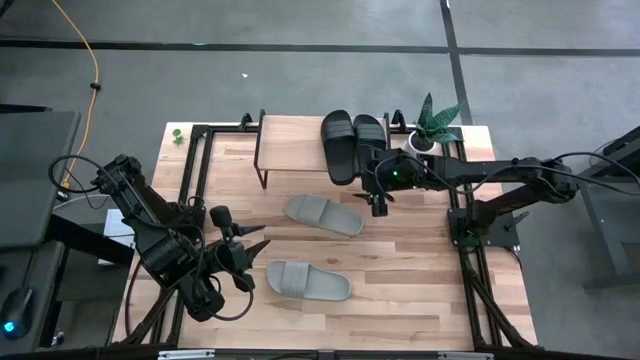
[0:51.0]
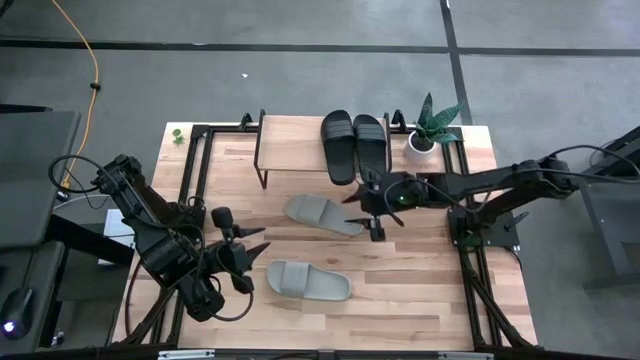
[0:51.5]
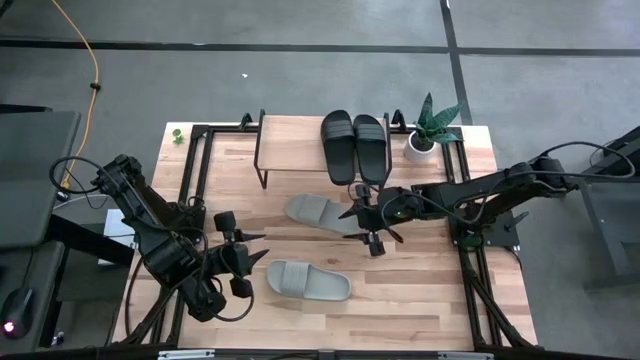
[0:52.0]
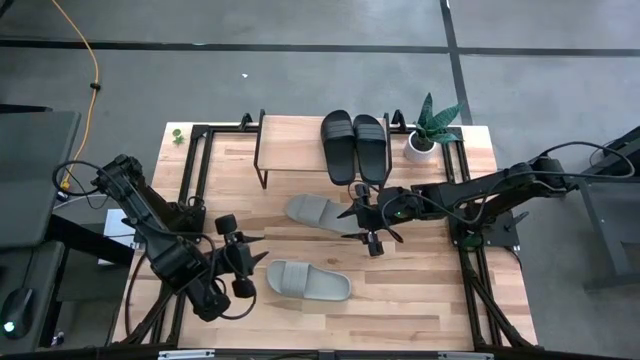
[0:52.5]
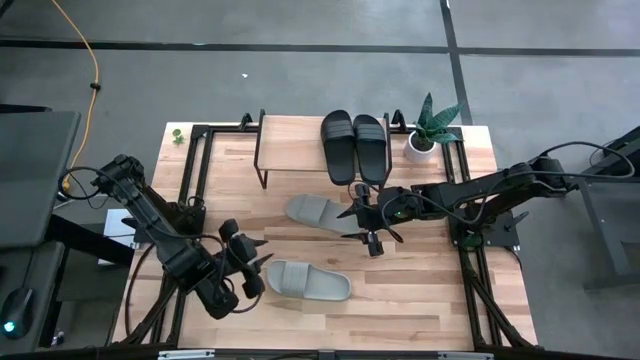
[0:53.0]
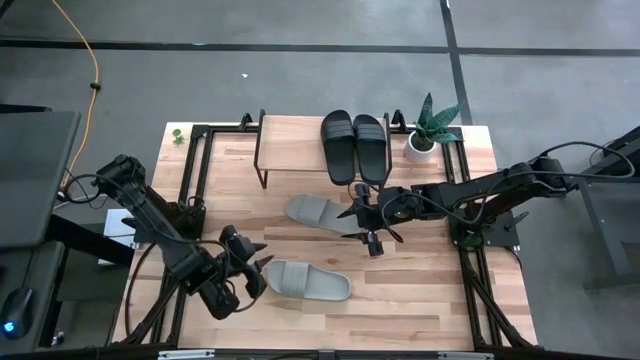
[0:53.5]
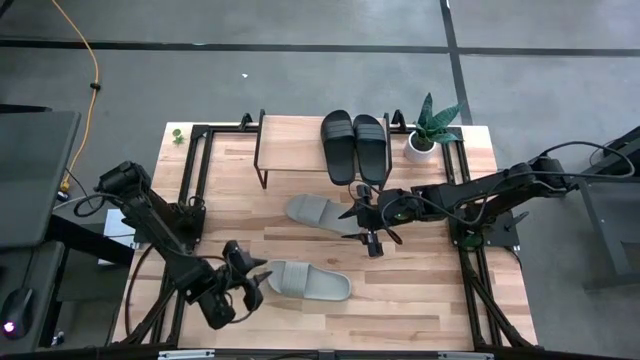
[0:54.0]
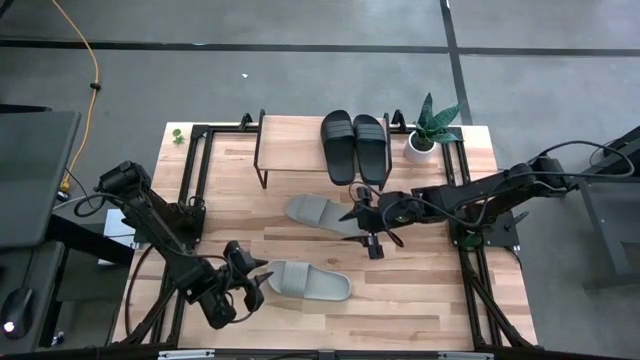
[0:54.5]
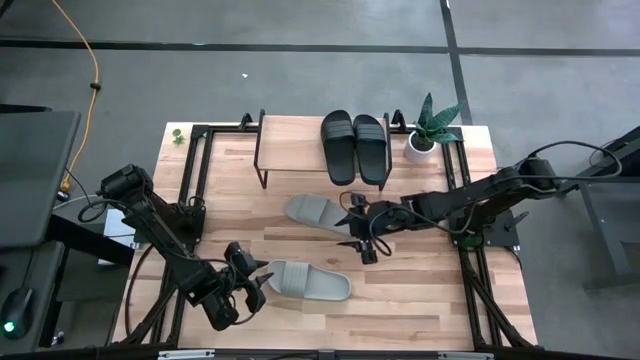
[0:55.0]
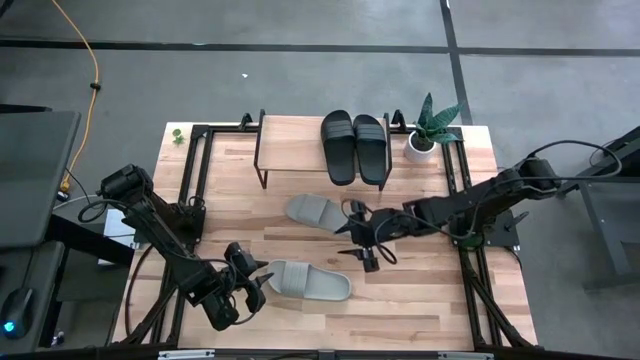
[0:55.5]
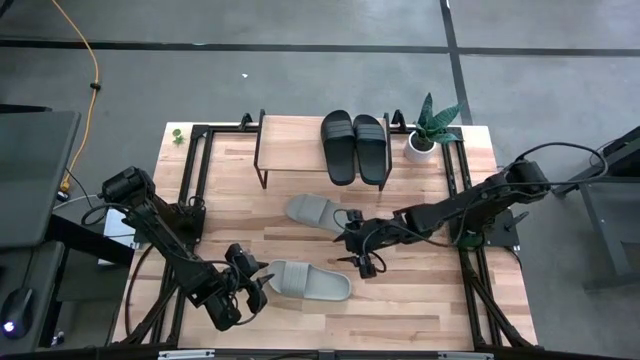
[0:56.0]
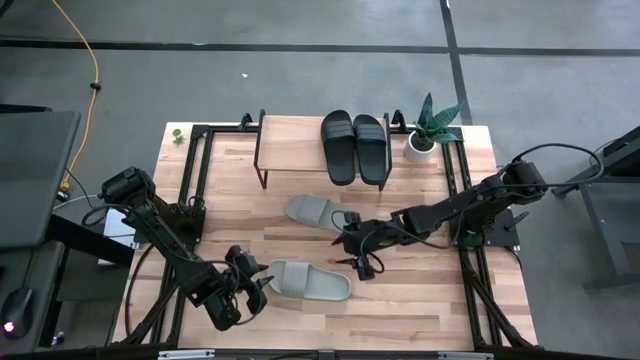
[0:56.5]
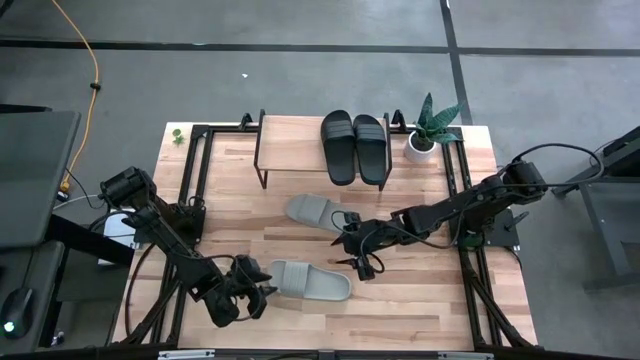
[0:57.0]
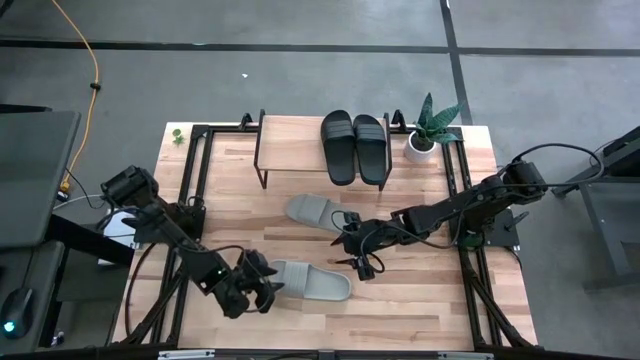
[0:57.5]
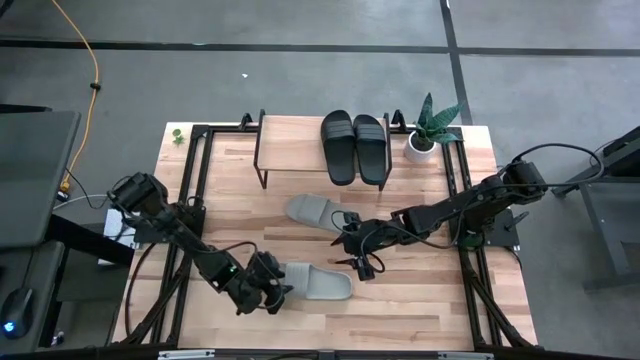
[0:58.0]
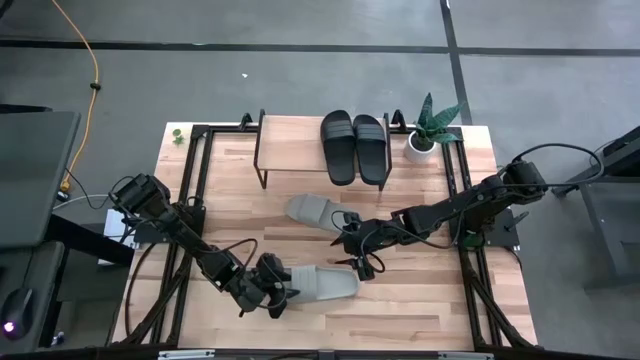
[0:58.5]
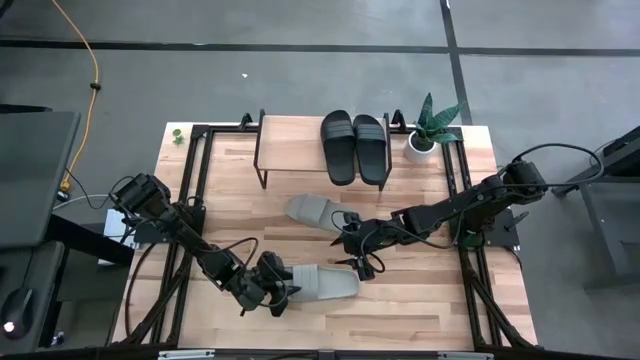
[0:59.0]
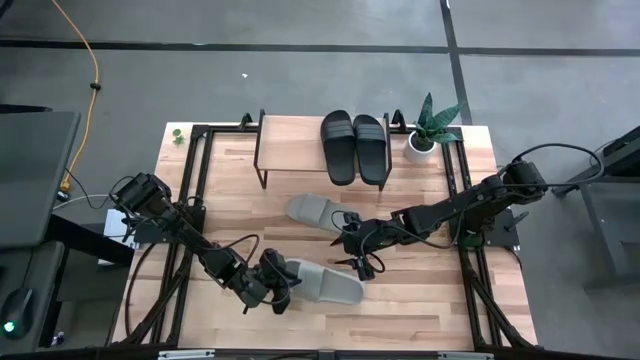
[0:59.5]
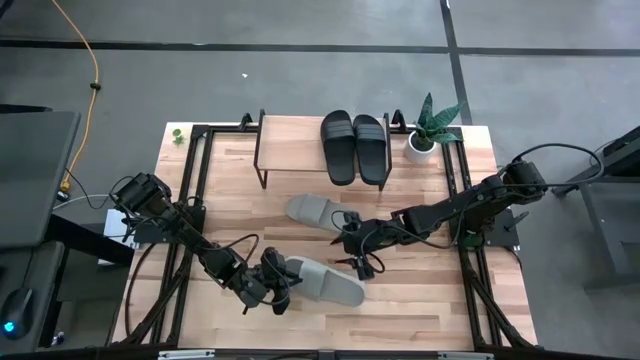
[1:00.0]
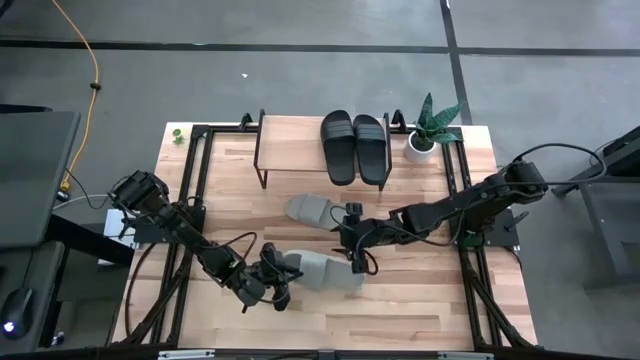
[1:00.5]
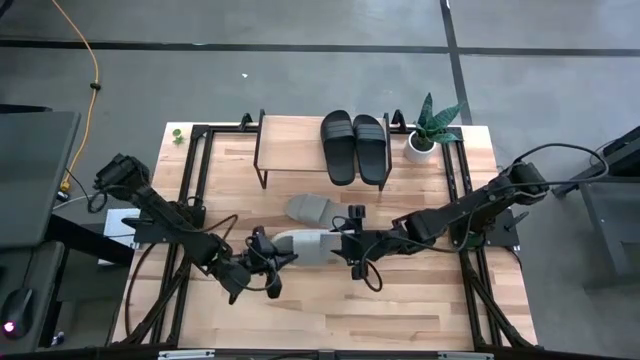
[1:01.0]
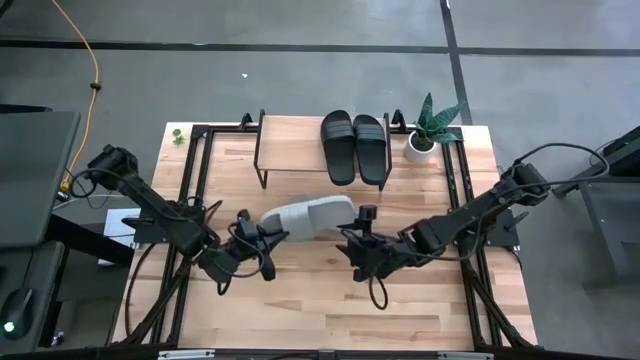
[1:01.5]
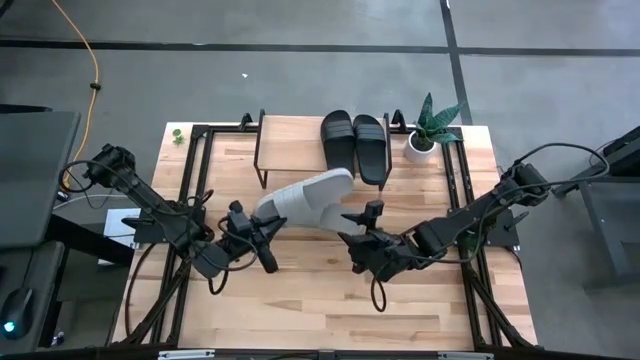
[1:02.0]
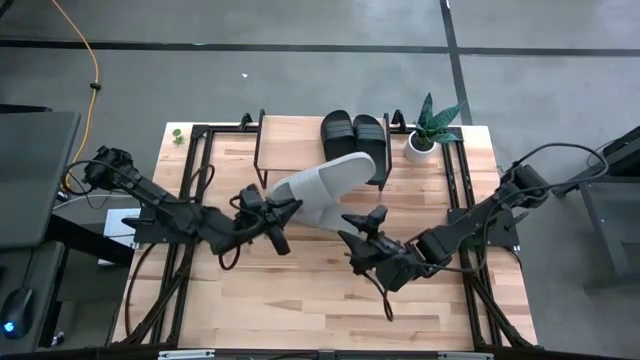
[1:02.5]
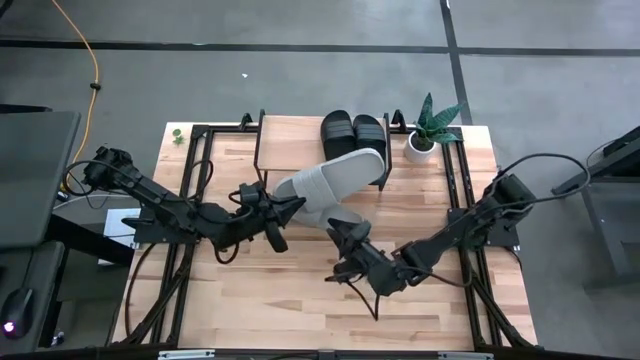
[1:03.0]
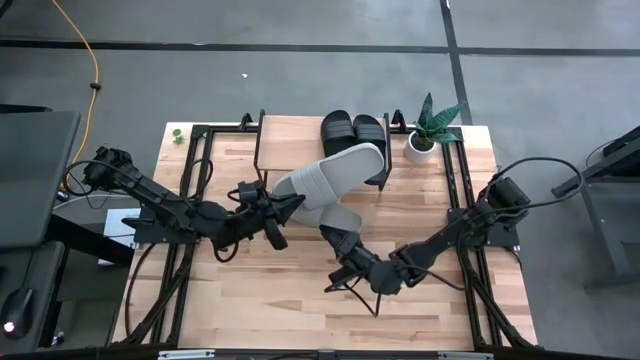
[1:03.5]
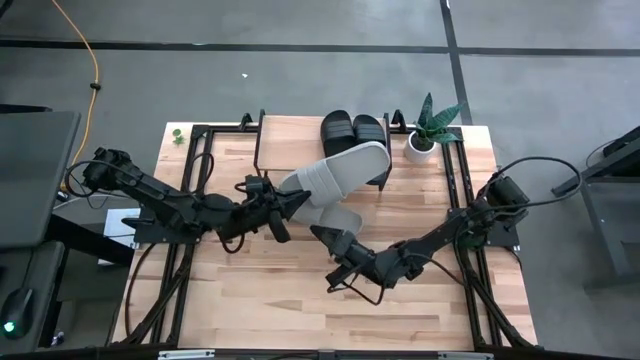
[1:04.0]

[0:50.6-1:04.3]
Task: Pick and place slides into the shelf
Put the bottom white slide on the shelf

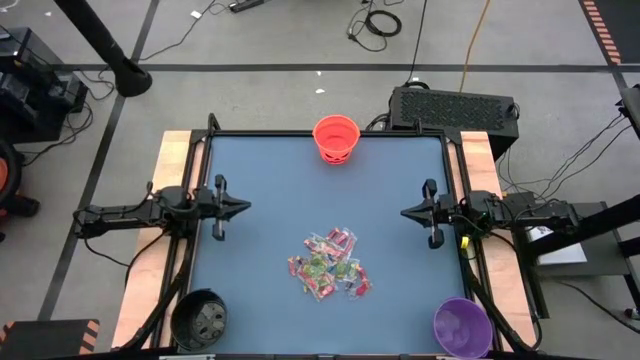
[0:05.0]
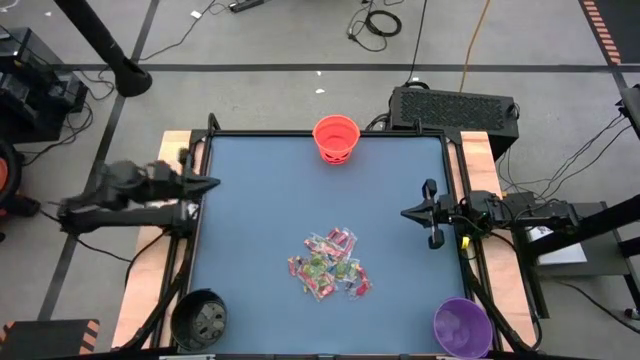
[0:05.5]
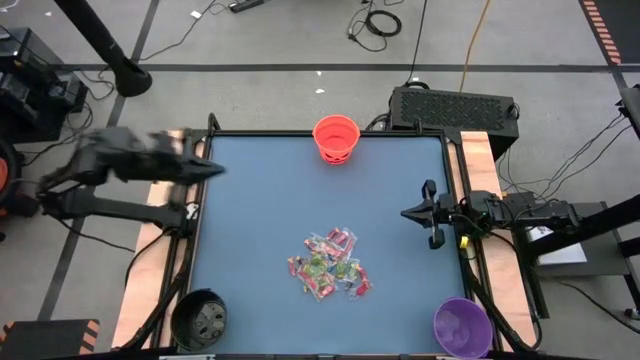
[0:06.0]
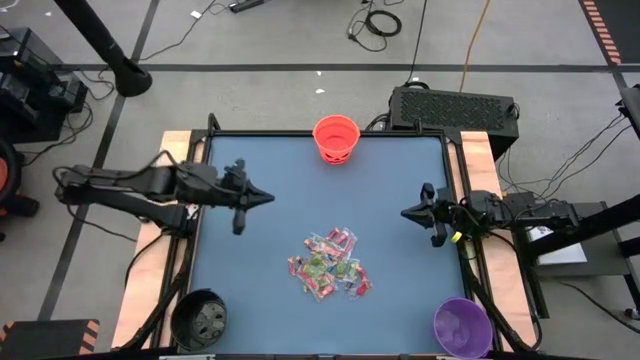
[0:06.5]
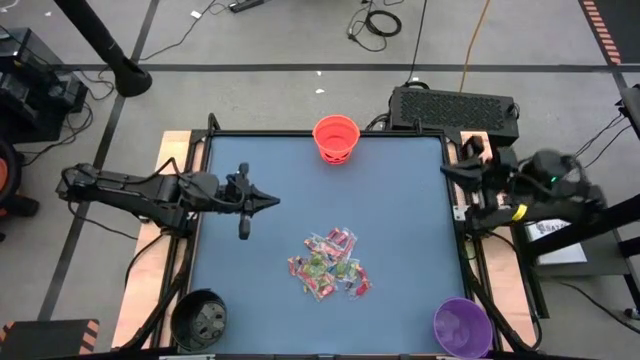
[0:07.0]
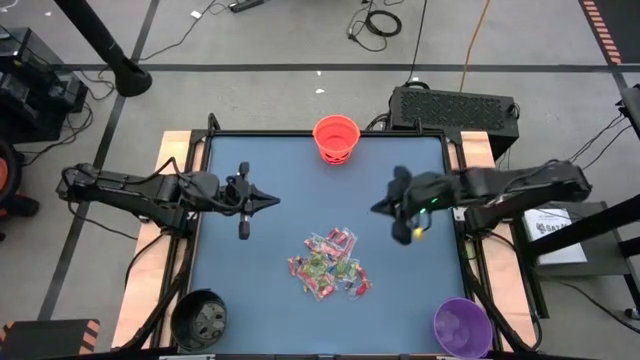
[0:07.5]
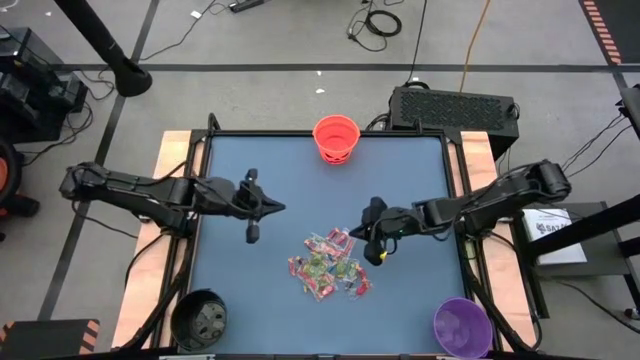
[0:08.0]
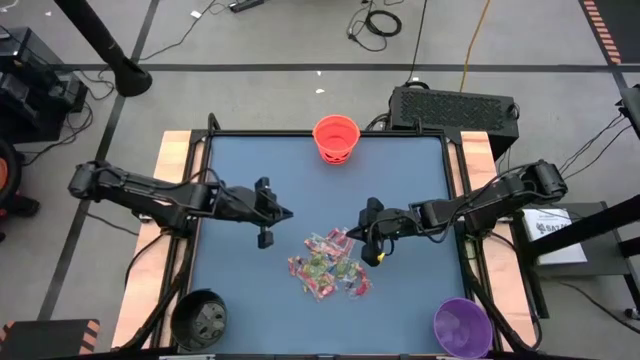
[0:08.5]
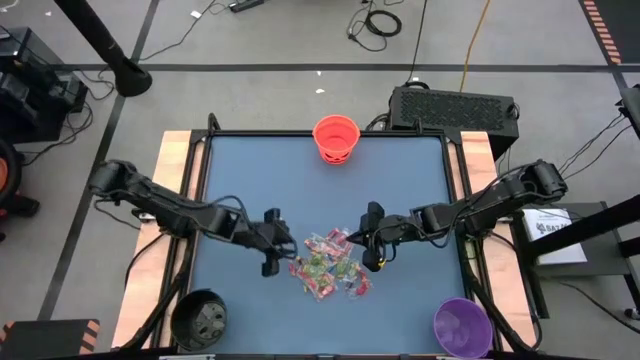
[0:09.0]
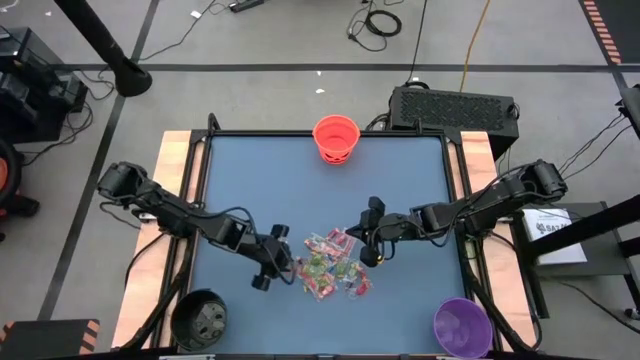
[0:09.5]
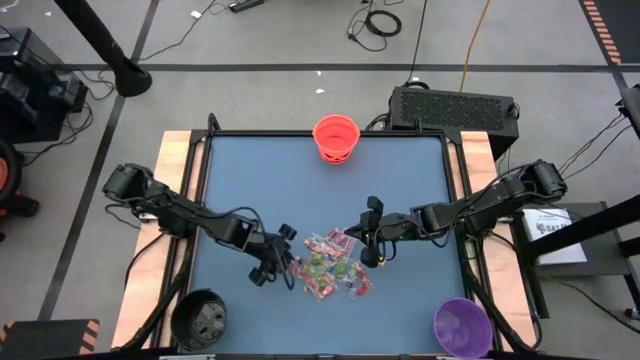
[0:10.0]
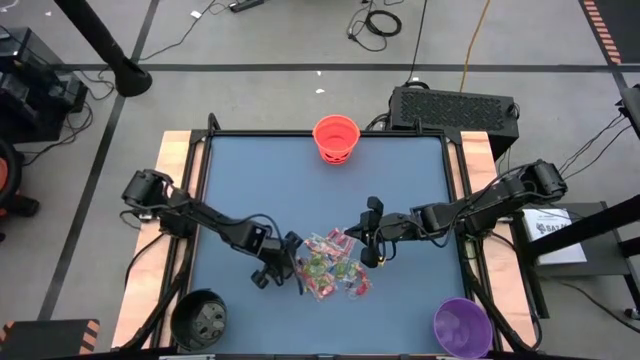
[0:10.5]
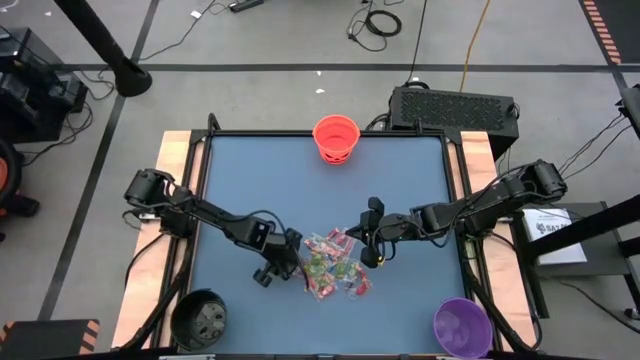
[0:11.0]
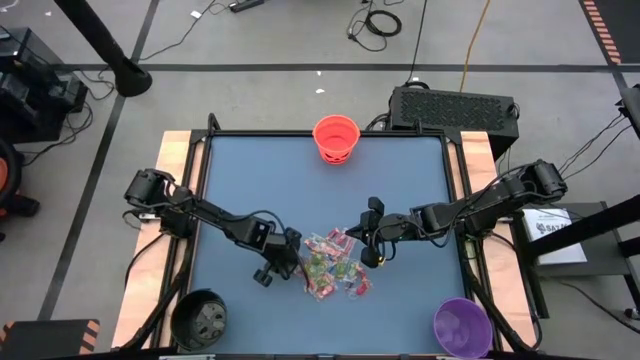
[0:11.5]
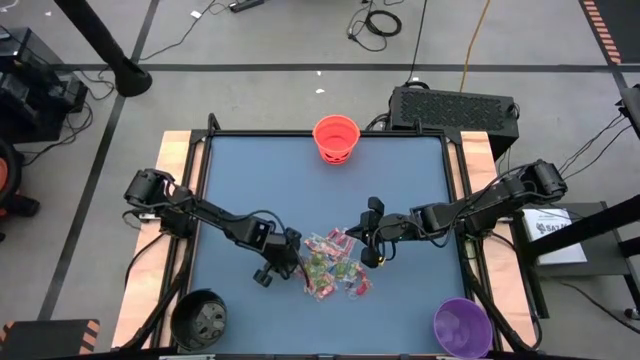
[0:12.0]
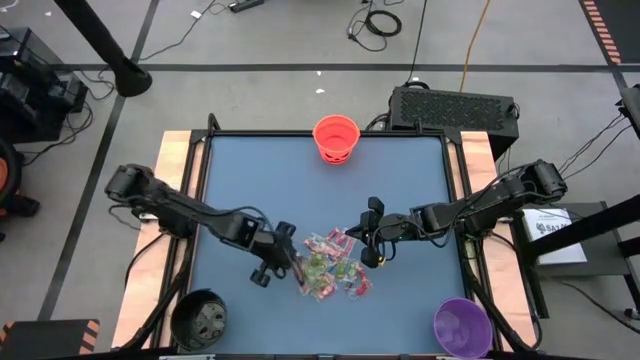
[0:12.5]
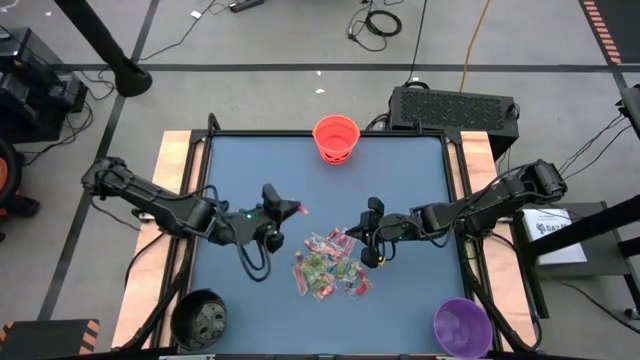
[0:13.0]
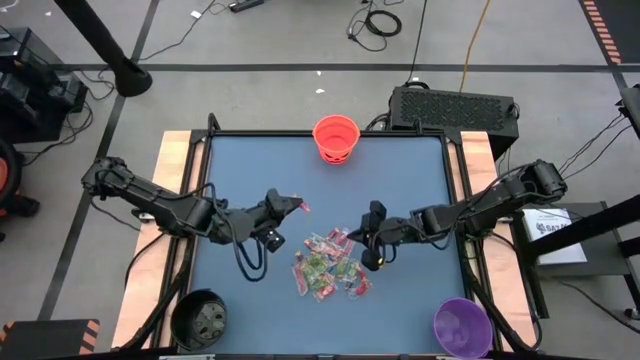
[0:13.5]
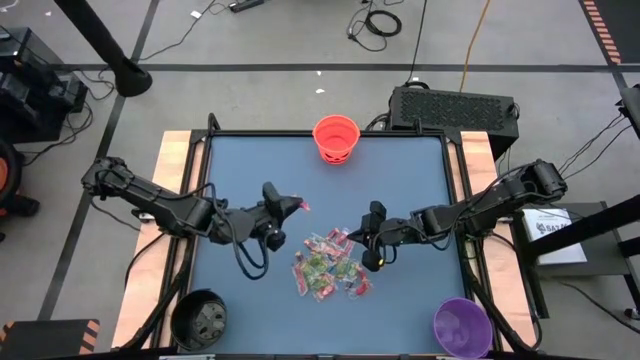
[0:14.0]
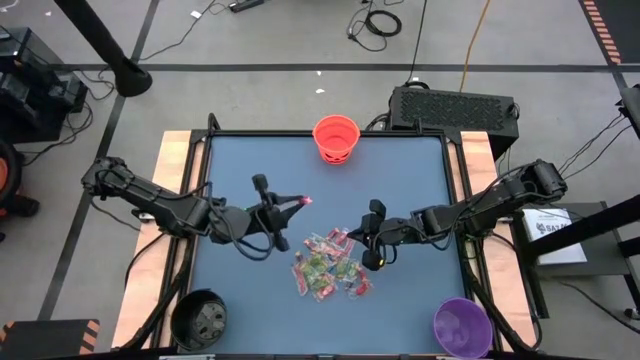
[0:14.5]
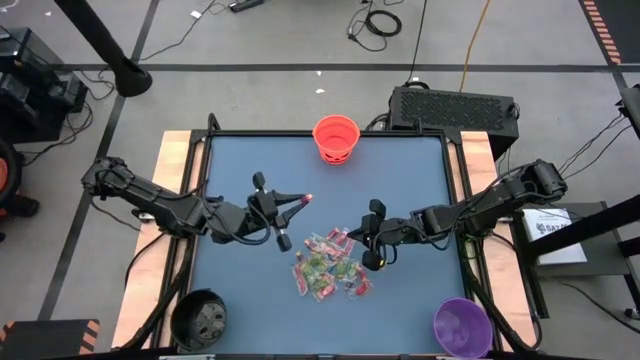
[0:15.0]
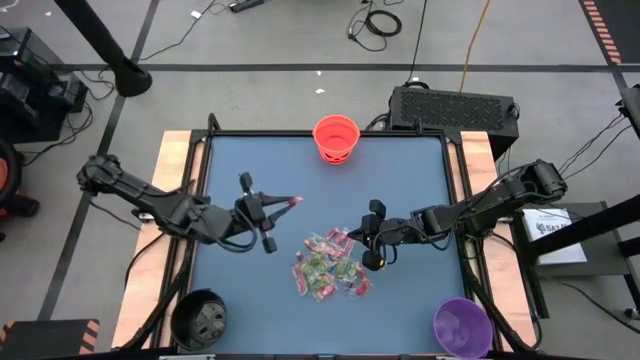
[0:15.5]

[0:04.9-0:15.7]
Task: Sort candy by brand, put in halloween buckets
Put the orange candy into the black bucket
